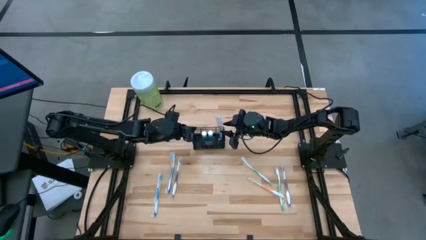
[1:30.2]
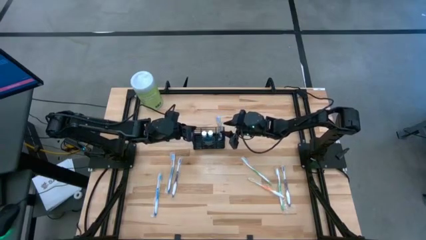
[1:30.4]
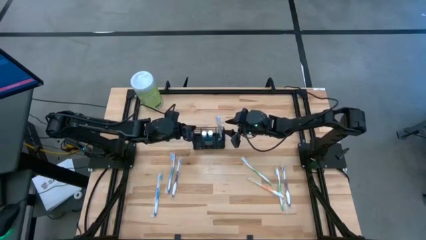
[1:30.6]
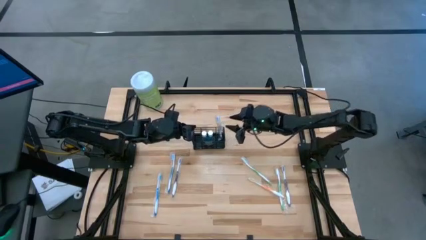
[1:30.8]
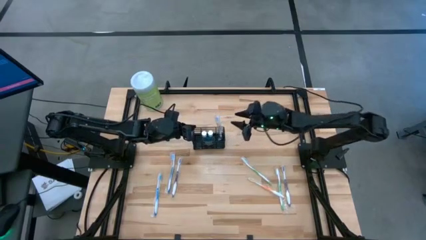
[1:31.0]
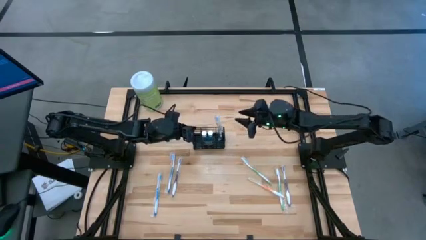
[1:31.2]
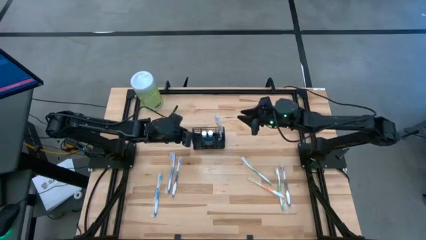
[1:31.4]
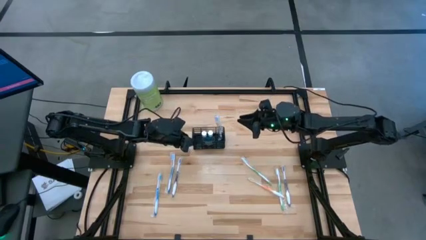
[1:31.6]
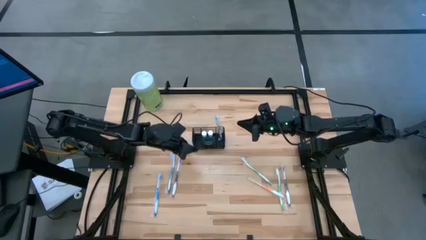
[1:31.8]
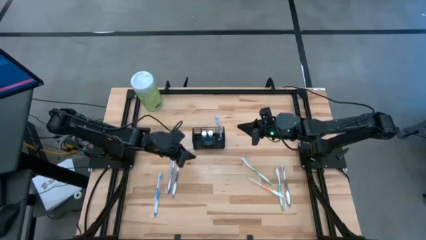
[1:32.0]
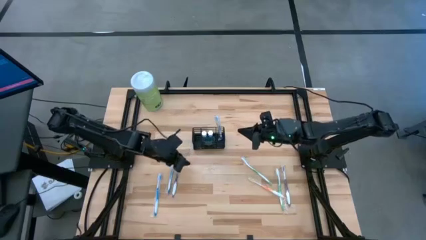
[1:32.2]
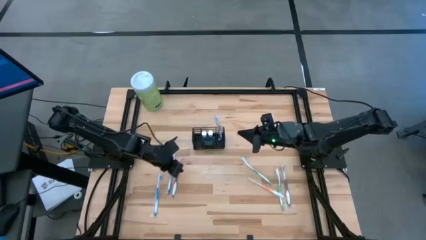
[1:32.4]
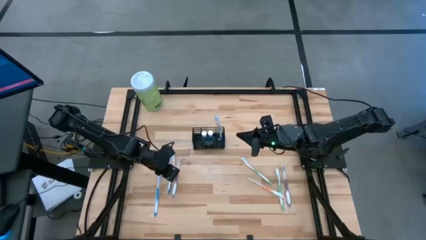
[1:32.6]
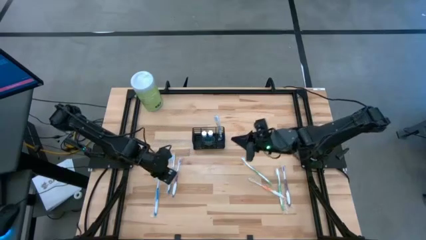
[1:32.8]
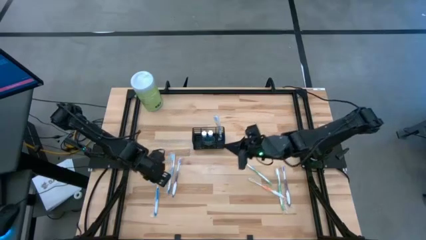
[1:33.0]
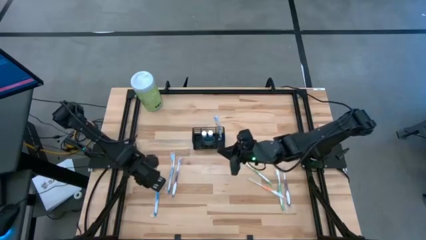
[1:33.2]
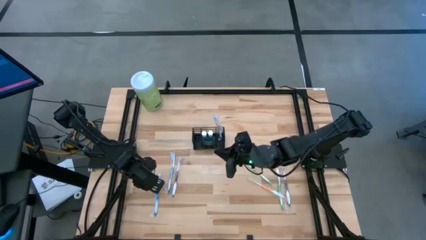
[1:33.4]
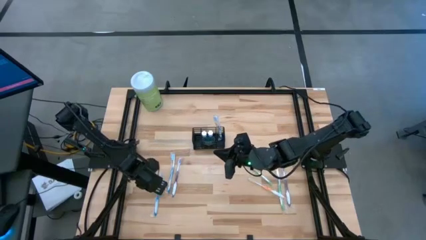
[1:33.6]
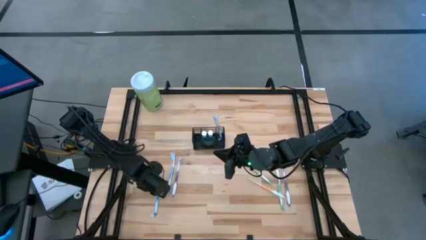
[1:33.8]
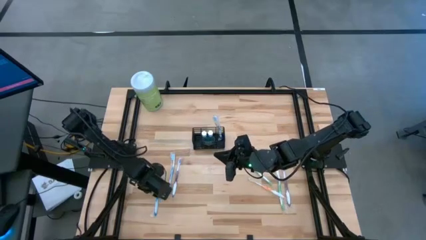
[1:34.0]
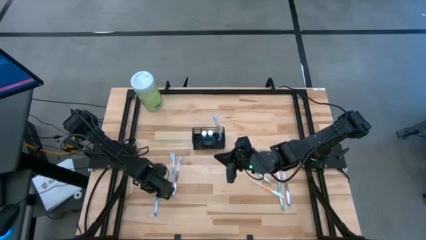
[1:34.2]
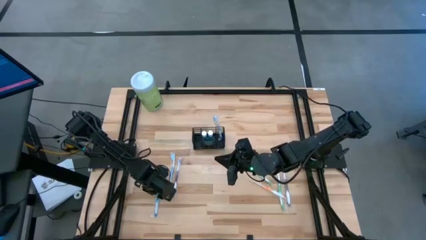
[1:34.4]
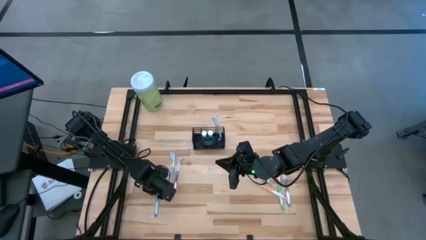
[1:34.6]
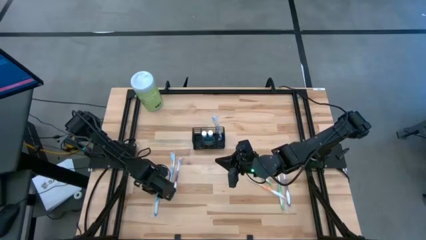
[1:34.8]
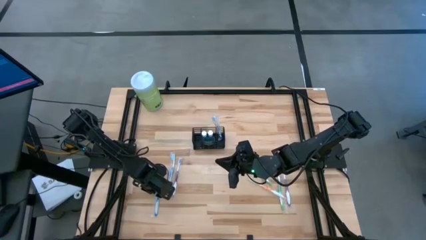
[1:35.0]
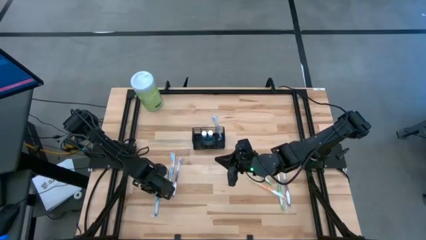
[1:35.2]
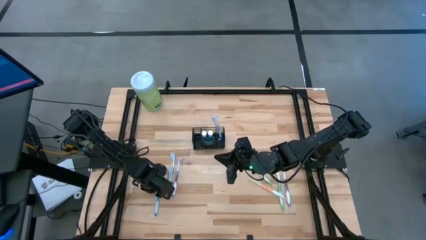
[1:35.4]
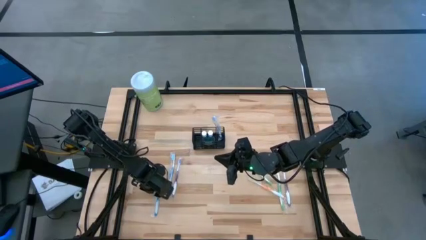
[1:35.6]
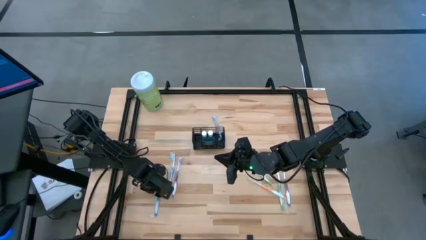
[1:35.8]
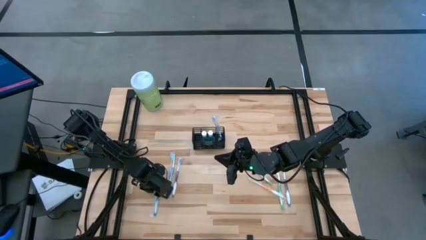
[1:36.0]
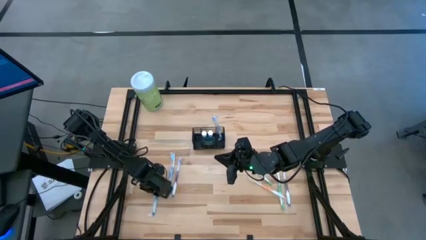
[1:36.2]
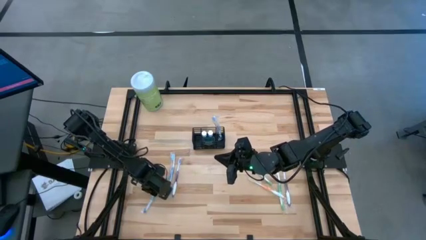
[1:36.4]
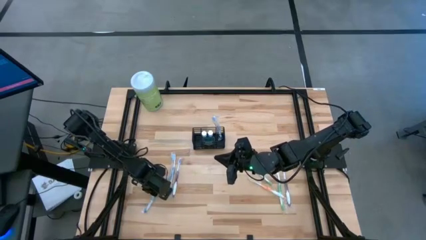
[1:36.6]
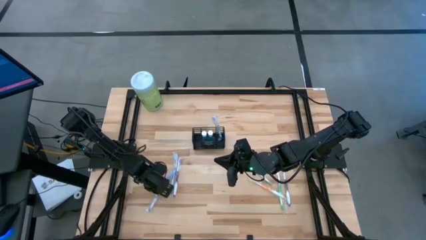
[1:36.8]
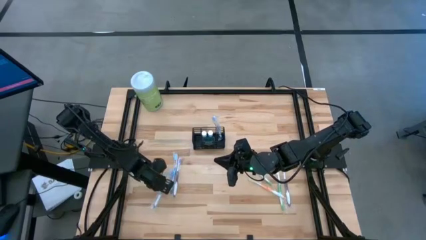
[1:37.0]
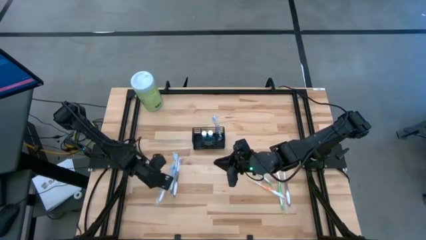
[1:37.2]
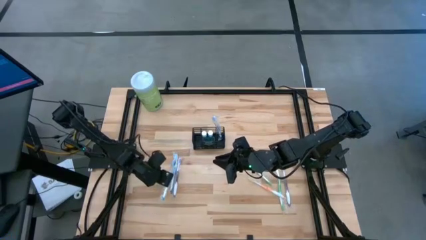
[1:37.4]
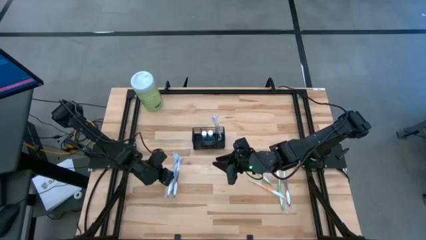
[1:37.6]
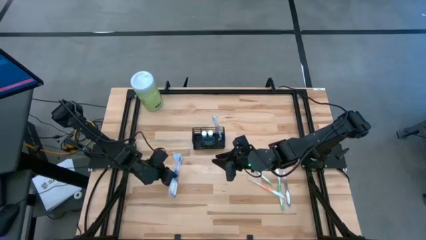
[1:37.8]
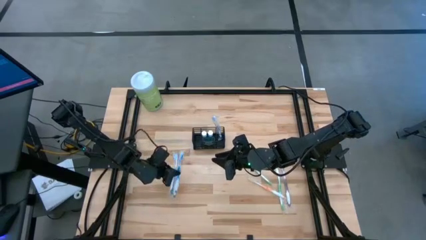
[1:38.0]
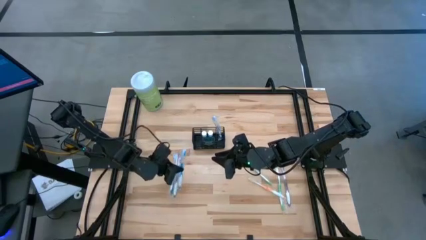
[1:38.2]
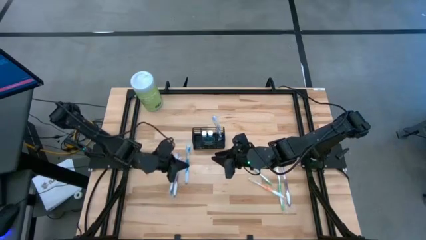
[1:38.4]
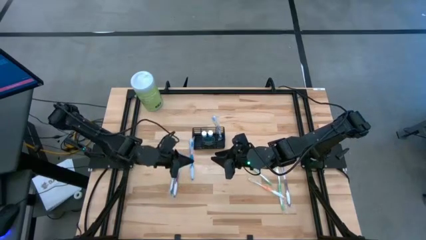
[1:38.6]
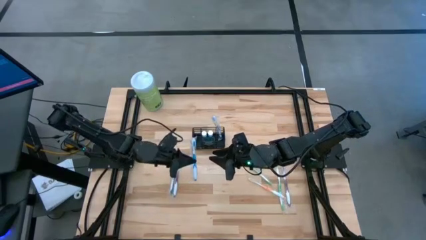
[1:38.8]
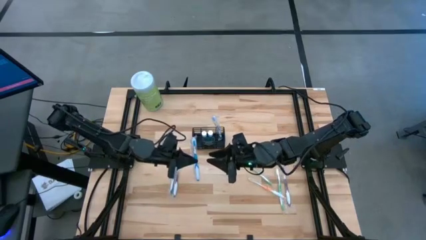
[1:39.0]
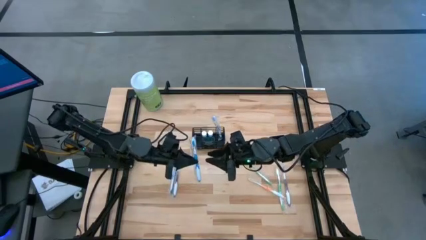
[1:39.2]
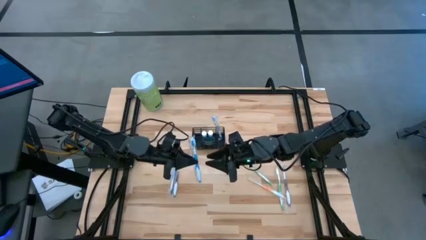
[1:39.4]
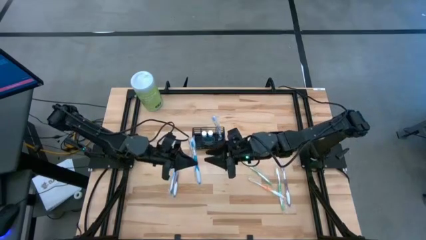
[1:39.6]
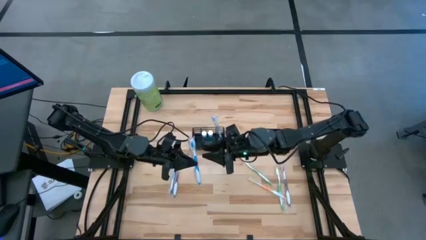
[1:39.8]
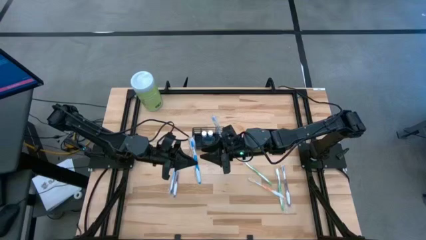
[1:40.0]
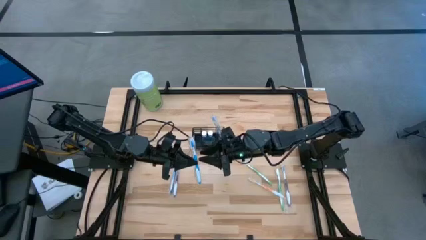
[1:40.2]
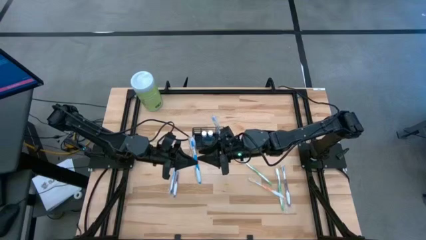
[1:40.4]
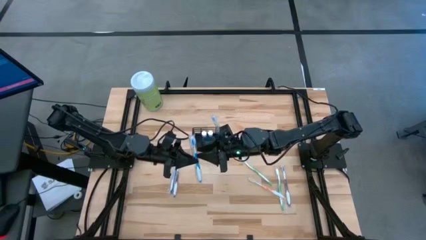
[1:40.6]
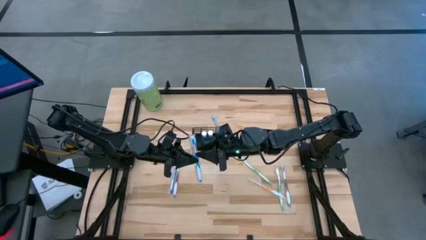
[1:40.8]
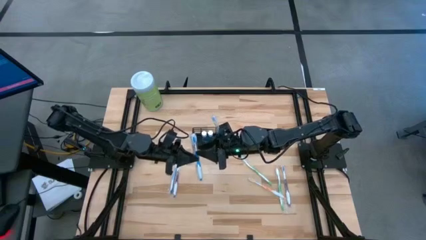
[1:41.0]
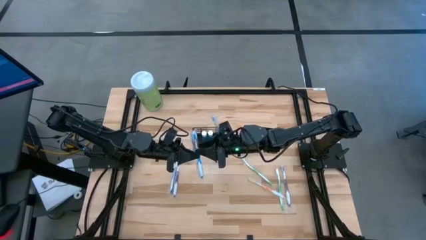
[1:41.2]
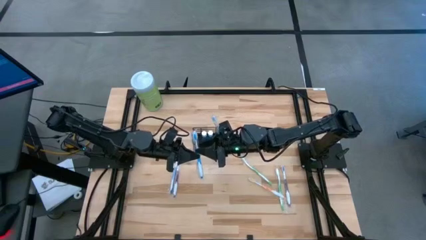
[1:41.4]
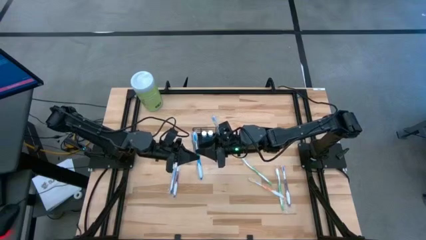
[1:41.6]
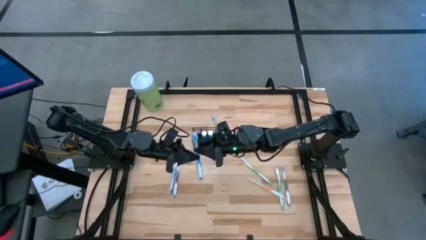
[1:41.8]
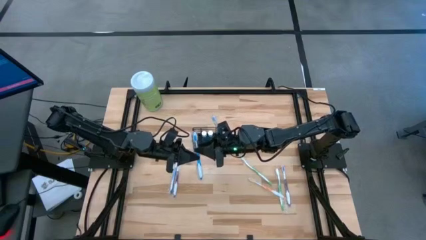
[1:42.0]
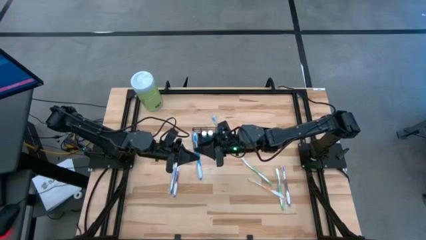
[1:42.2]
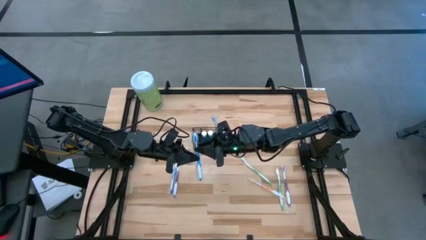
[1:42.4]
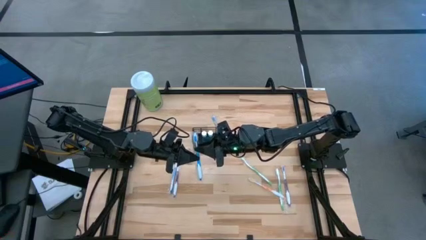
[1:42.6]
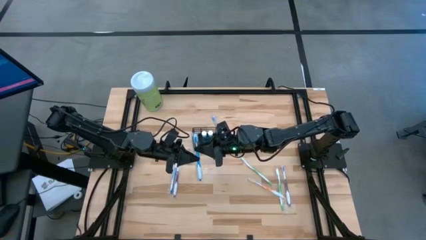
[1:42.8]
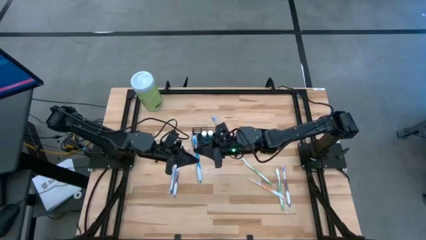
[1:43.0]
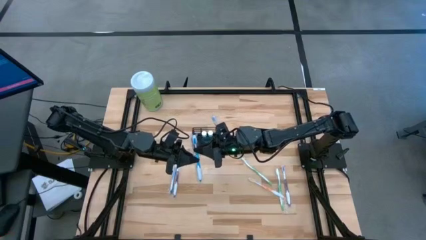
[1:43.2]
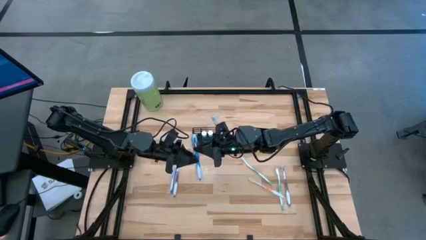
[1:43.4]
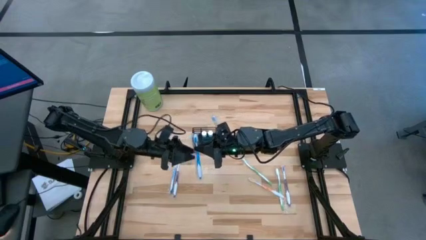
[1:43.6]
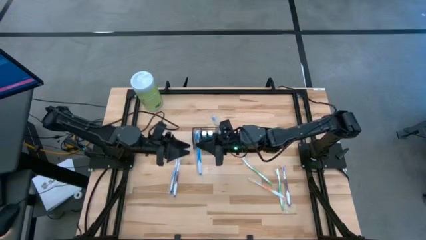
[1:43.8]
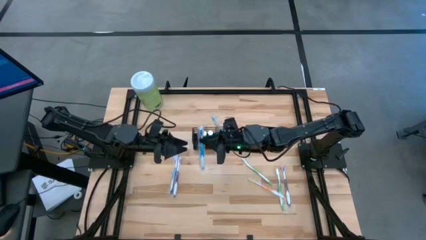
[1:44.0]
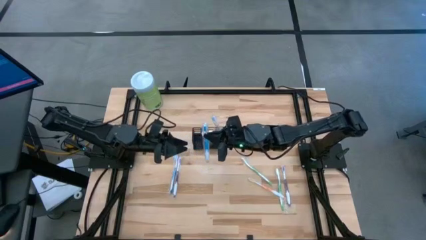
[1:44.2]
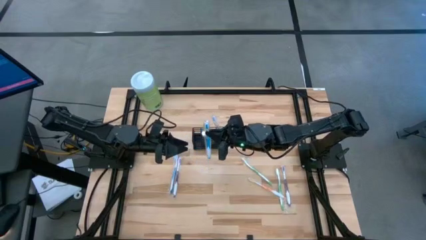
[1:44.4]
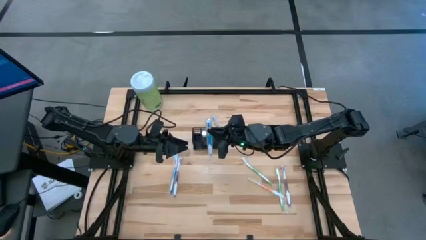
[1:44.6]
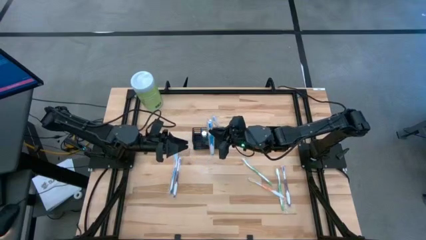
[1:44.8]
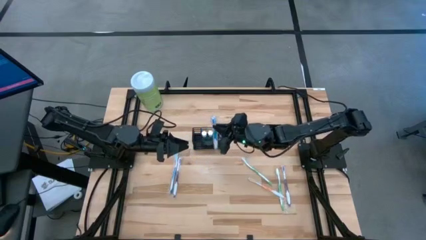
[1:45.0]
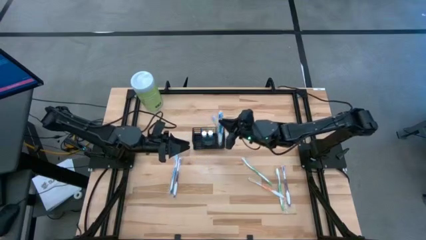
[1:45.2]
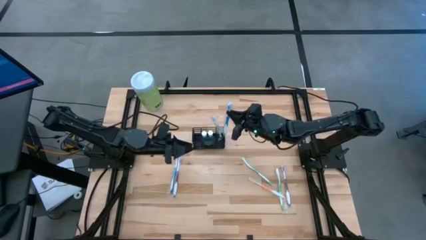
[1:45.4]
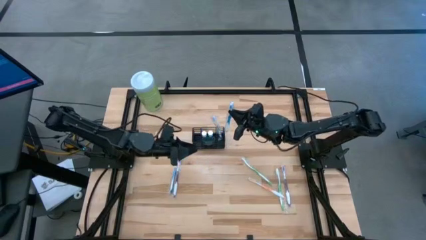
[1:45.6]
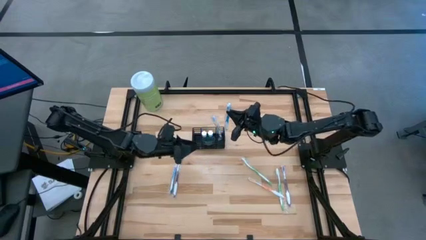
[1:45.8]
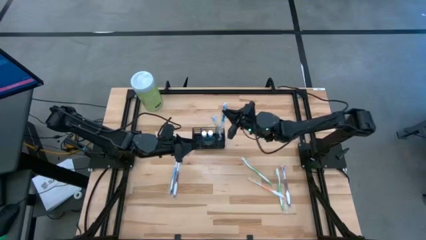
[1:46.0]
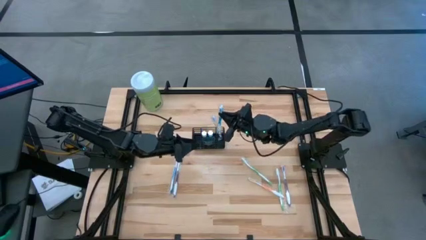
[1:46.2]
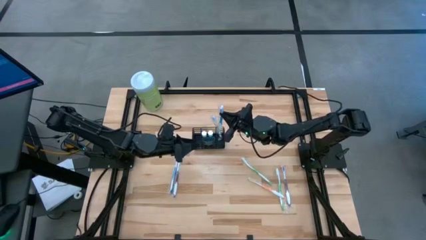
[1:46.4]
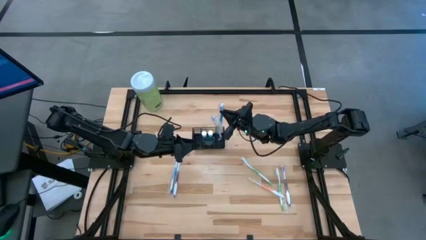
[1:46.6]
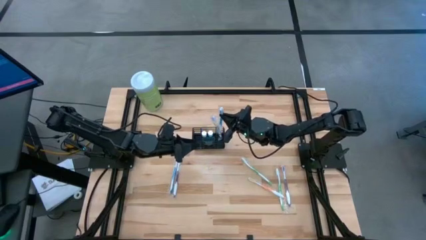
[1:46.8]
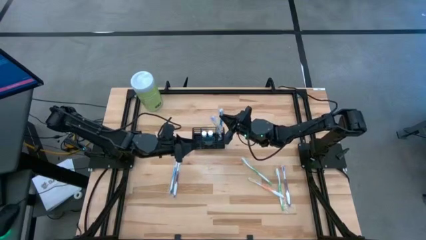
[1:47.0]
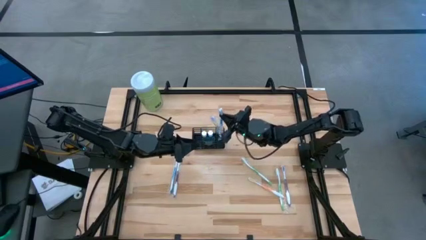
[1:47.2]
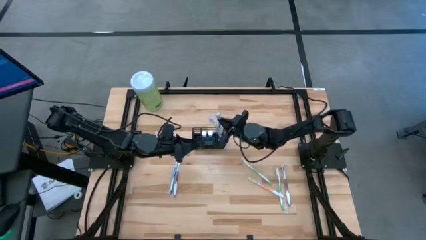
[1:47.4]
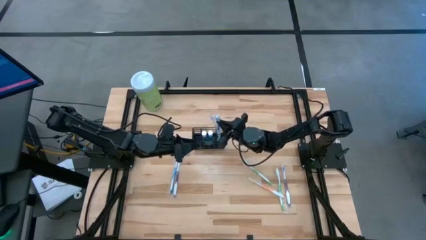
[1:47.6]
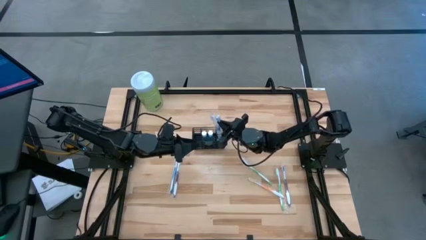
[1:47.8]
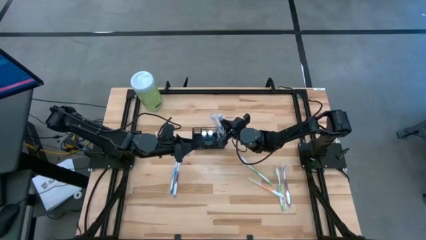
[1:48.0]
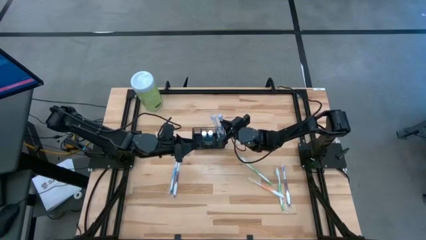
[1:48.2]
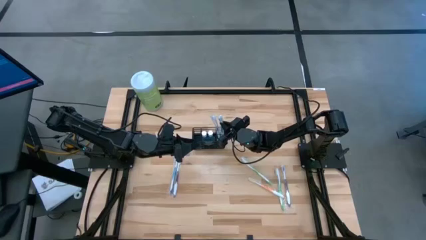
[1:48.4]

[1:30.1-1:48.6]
Task: Pick & Place toothbrushing station
Put the bottom blue toothbrush into the black mesh organizer
